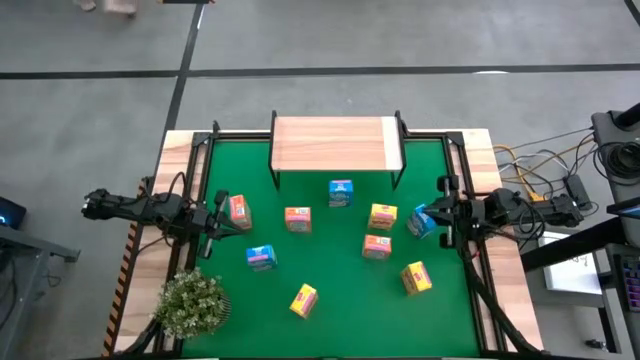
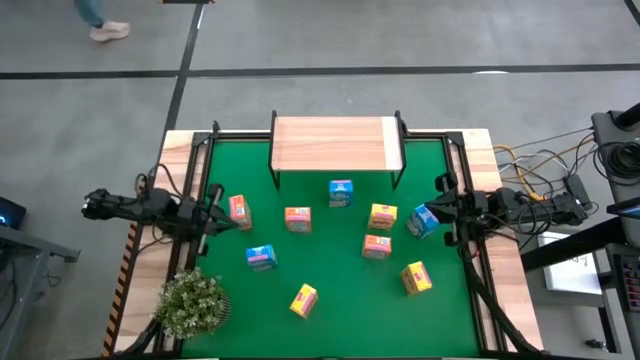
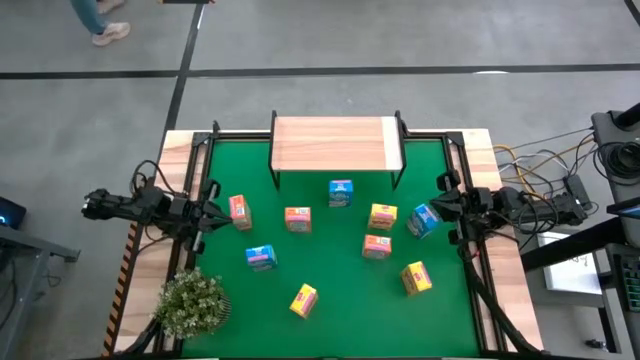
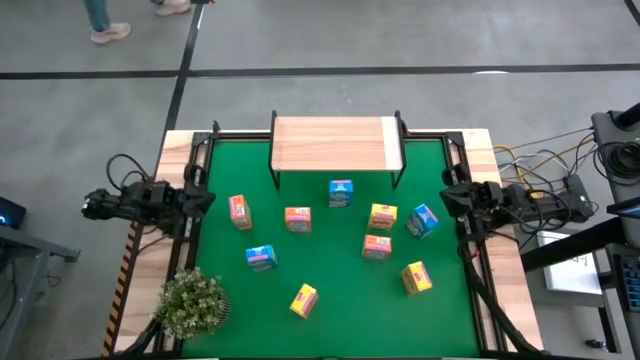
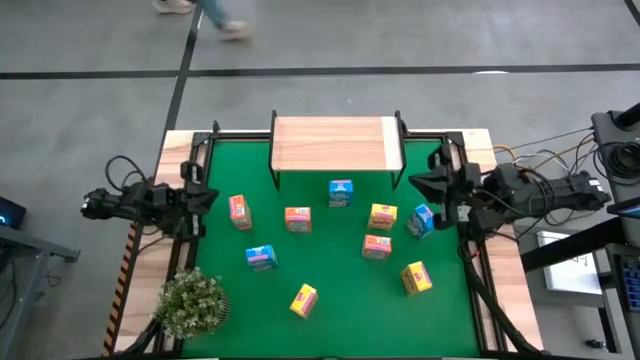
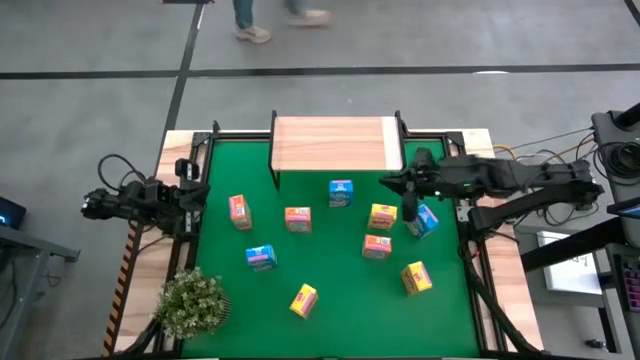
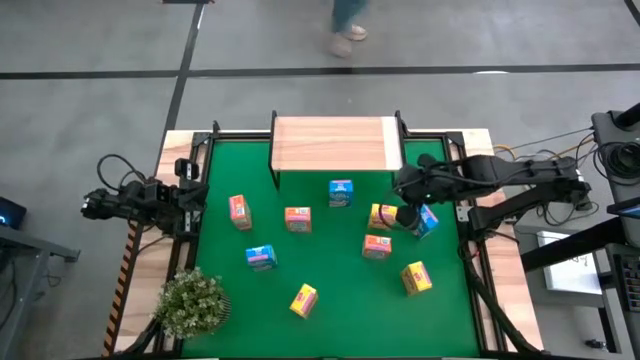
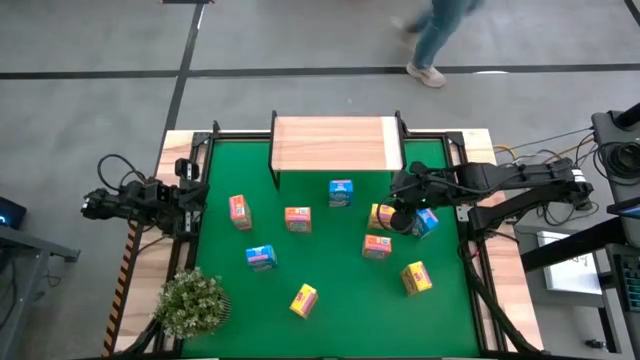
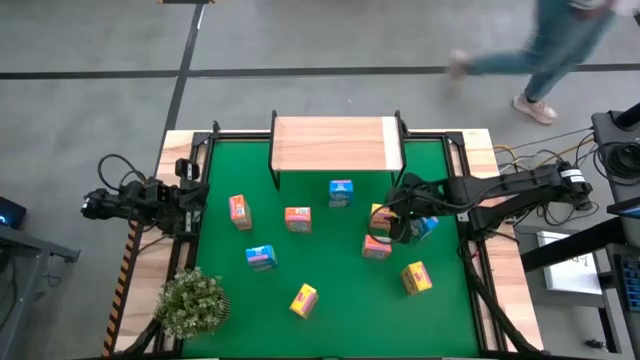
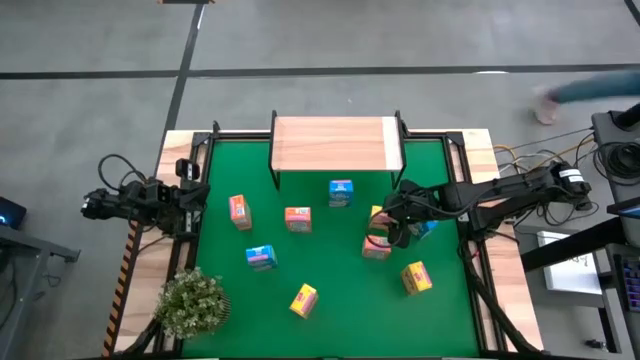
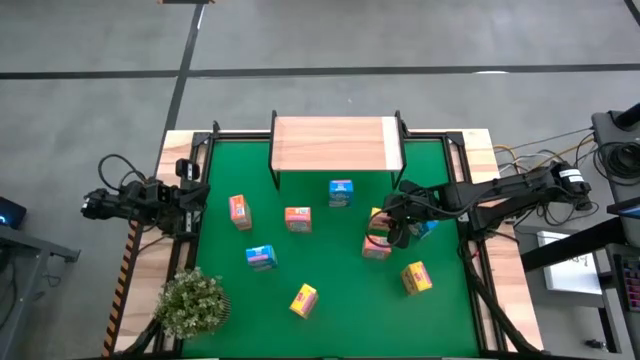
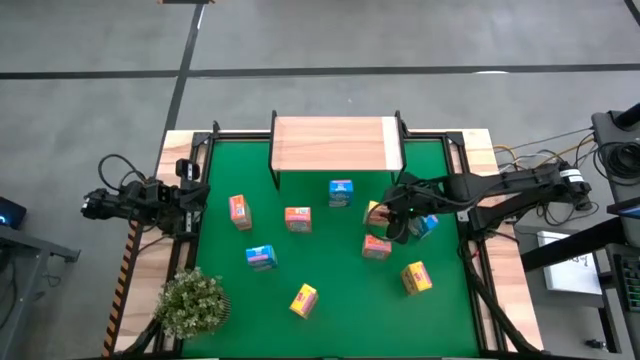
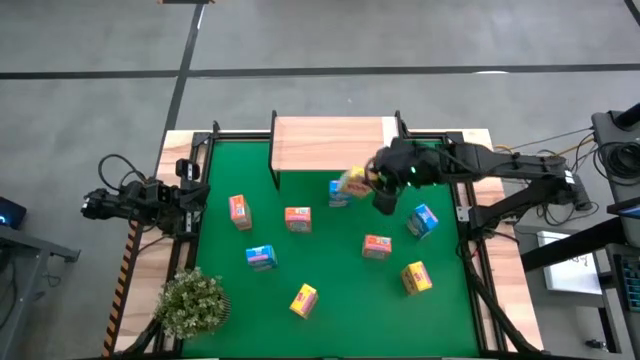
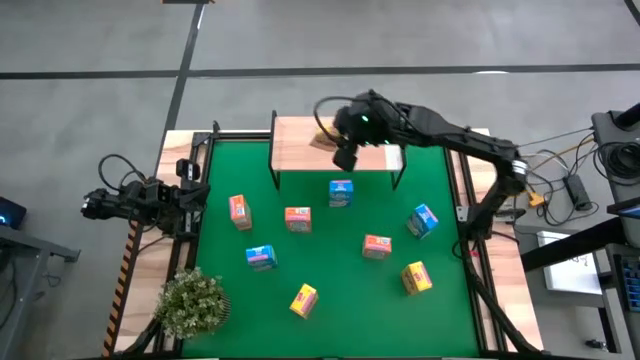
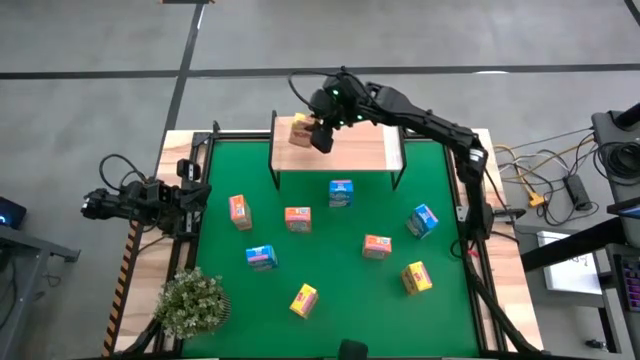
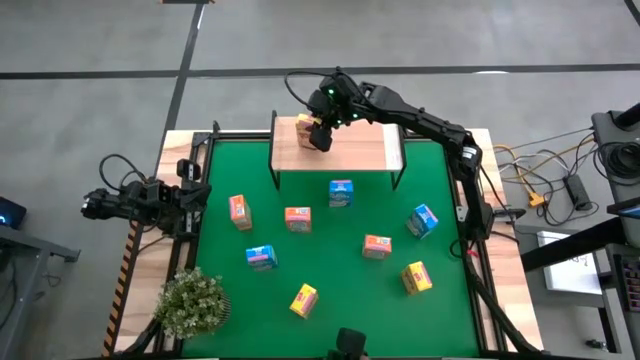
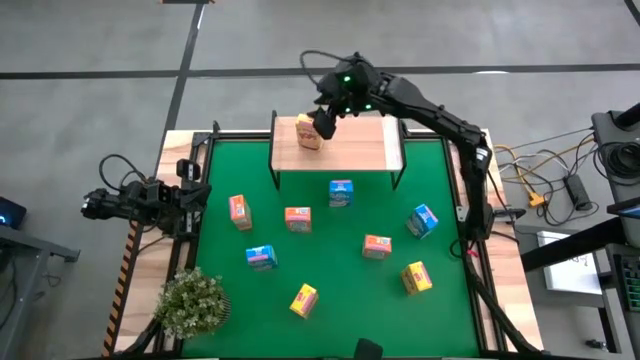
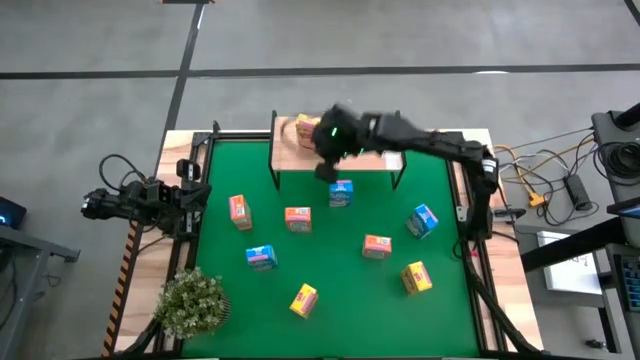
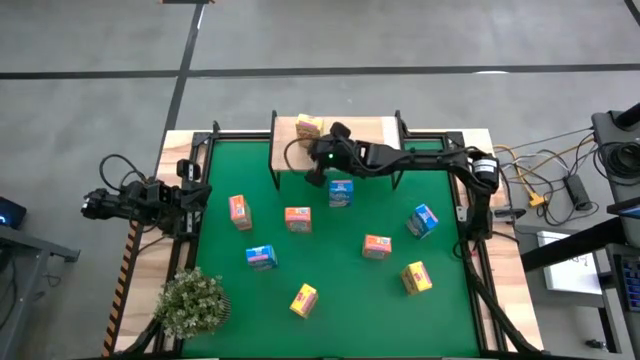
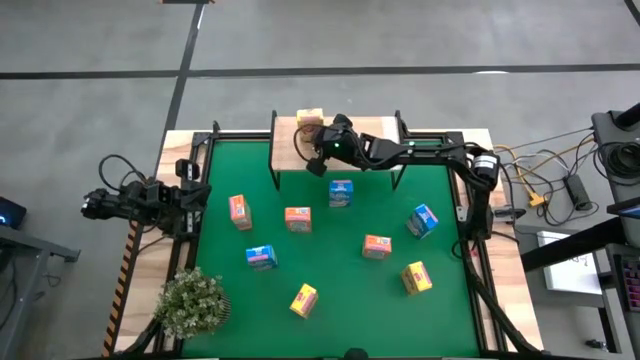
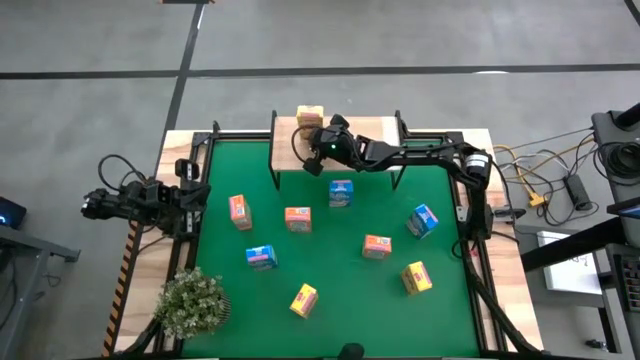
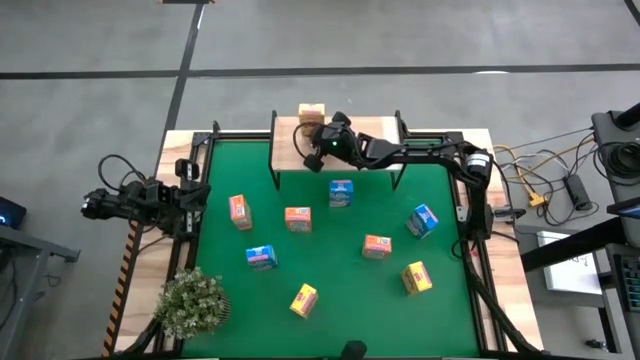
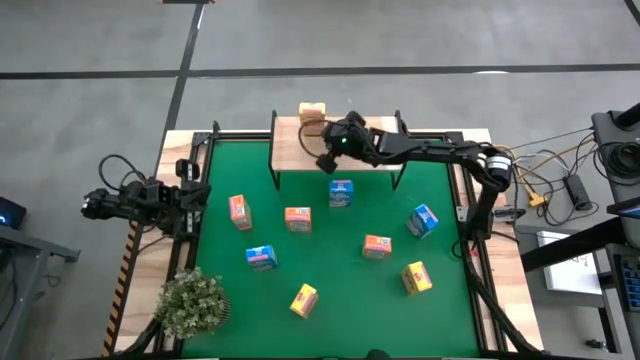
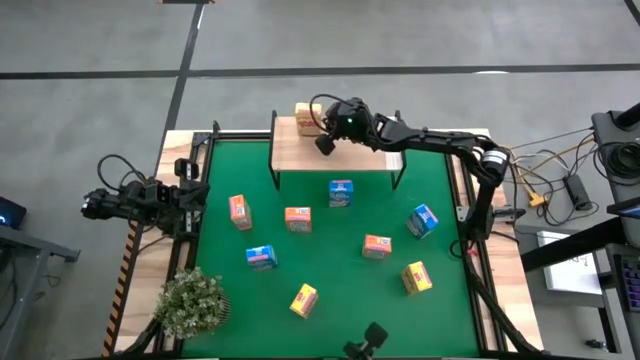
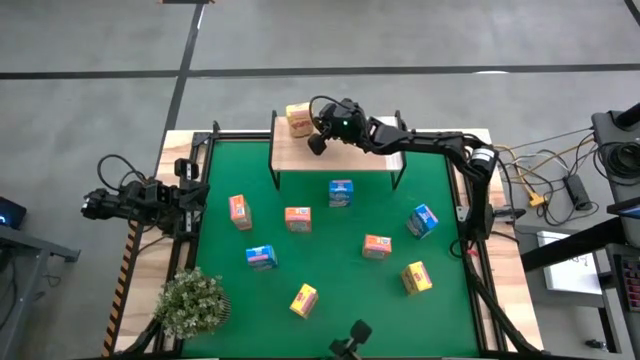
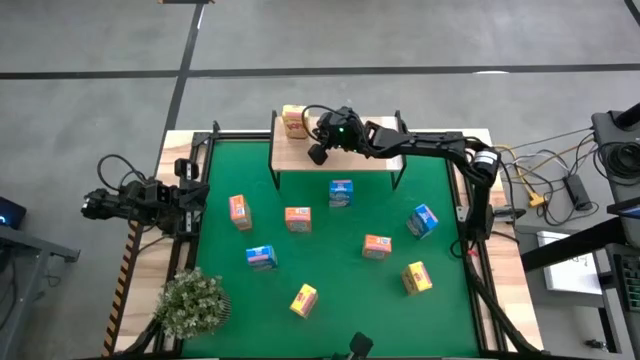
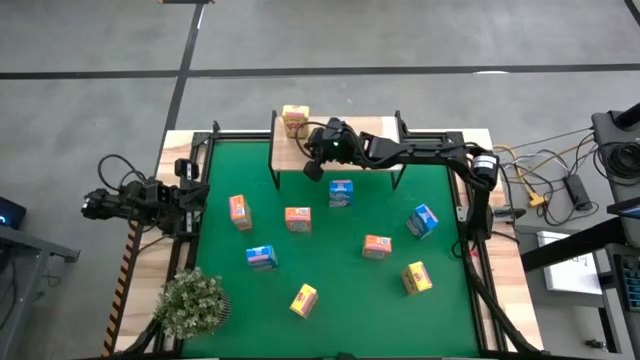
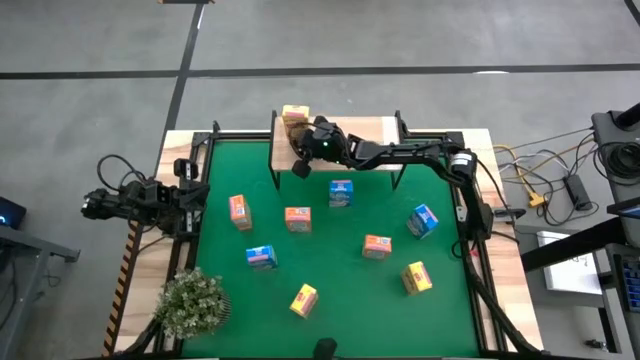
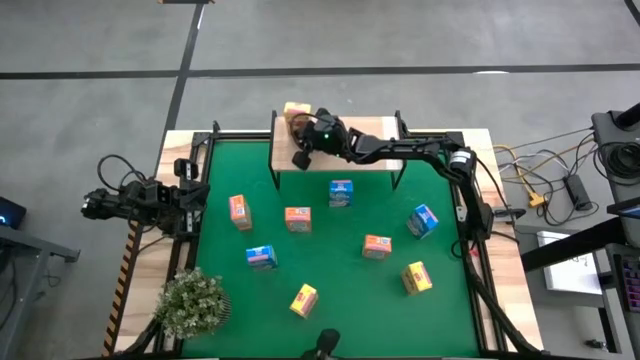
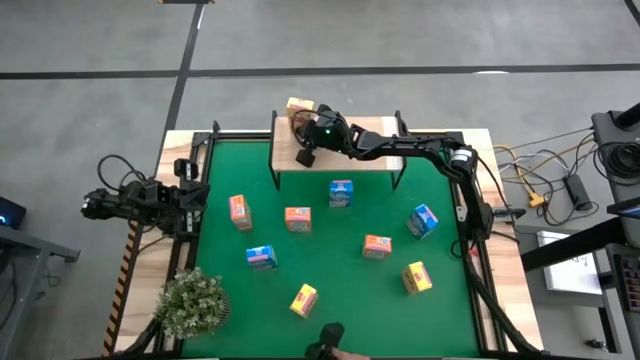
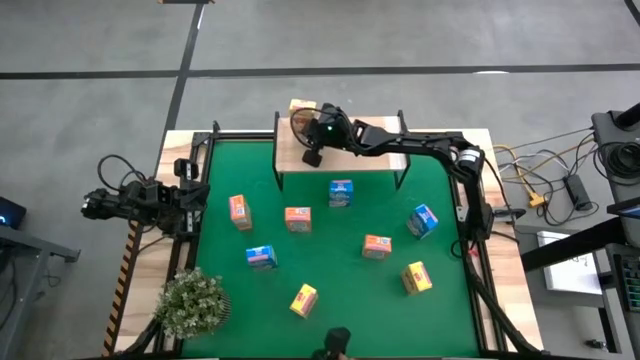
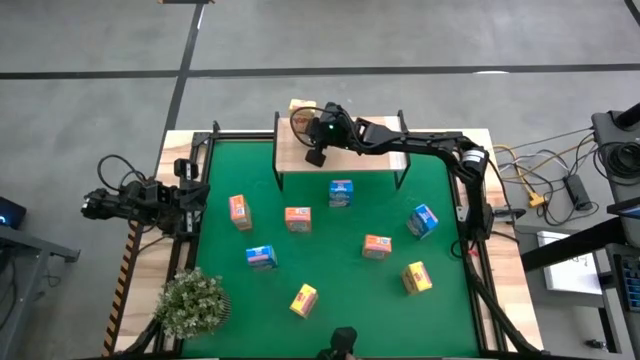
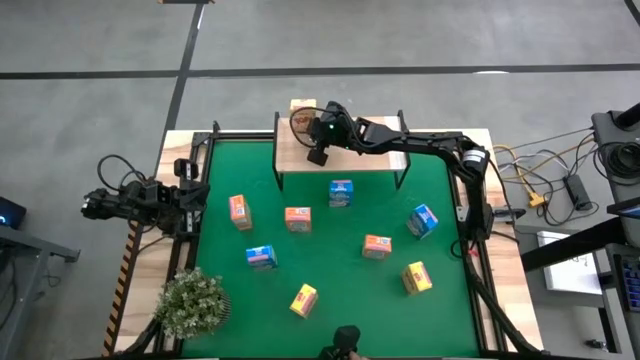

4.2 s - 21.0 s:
Task: Stack cereal on shelf
Put the top right yellow cereal box on the shelf

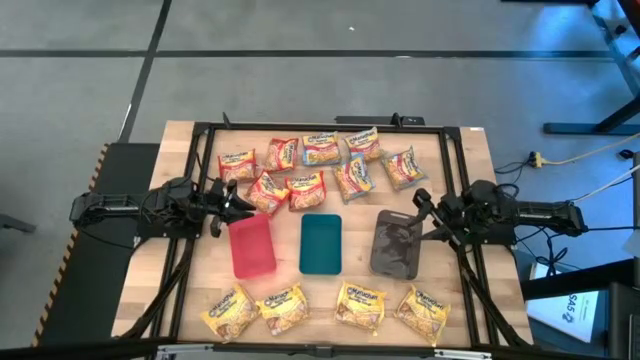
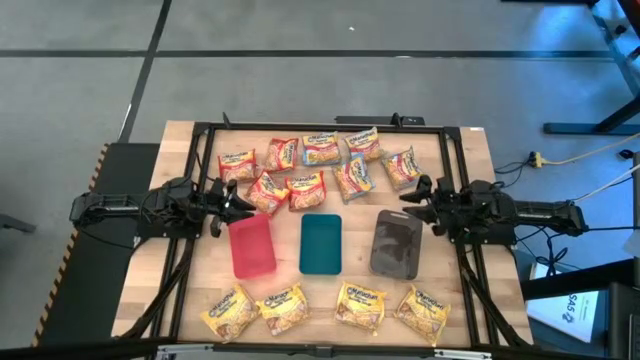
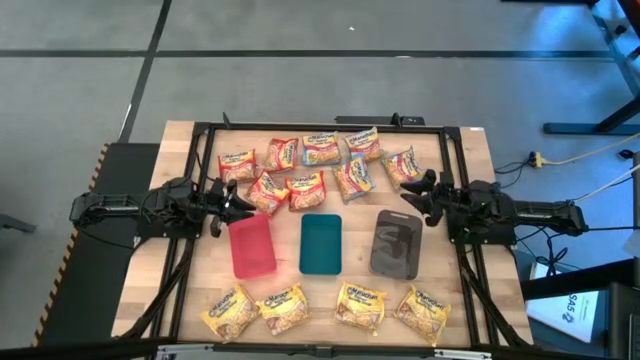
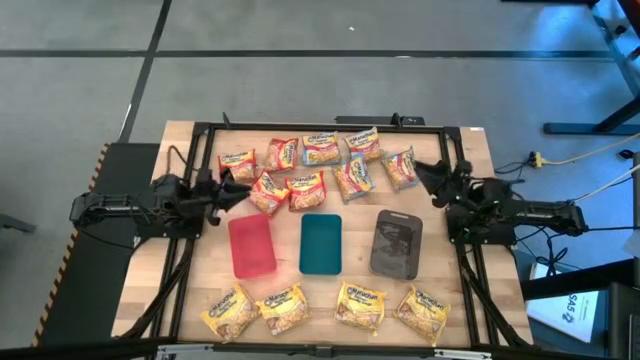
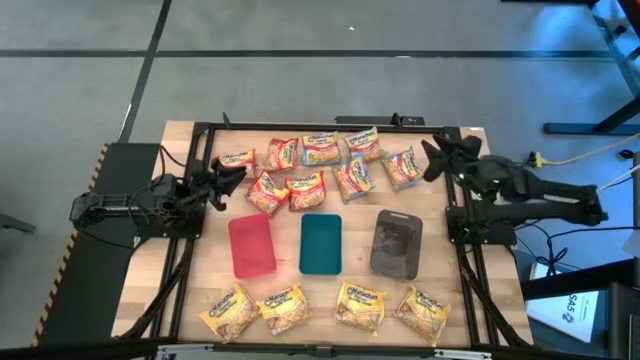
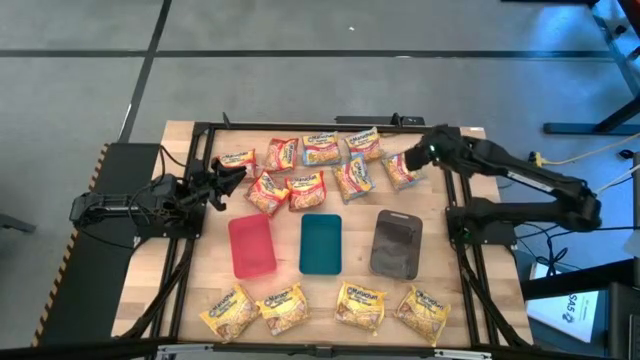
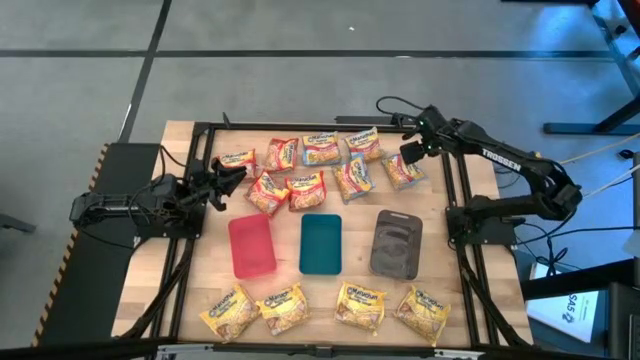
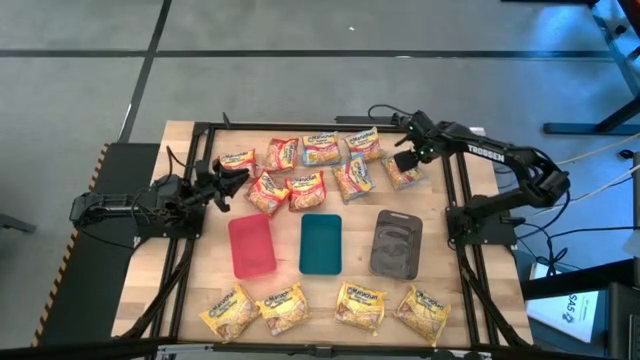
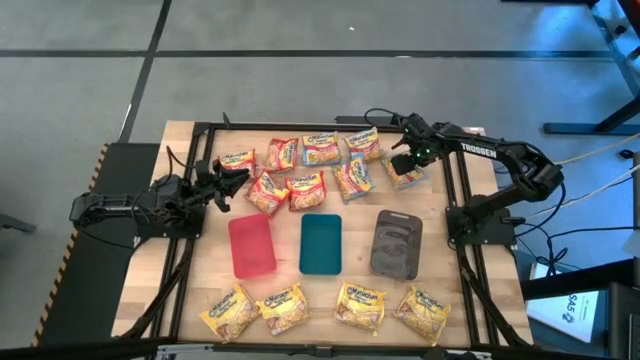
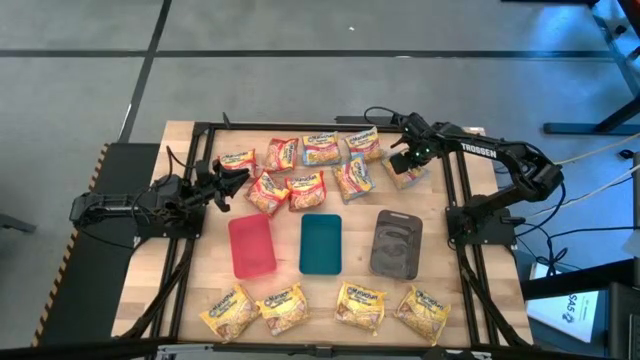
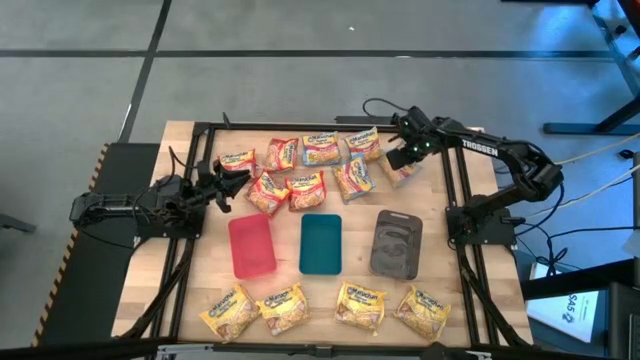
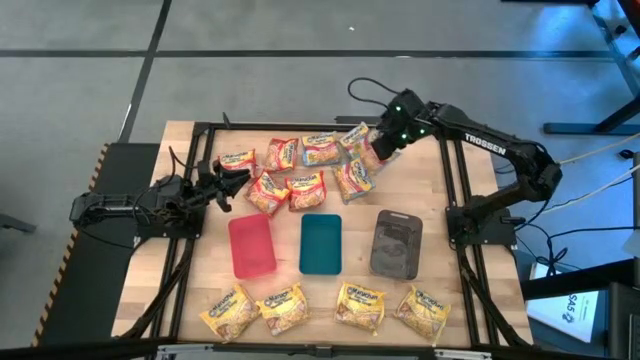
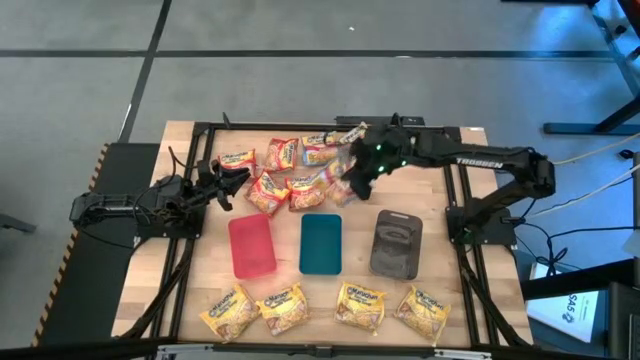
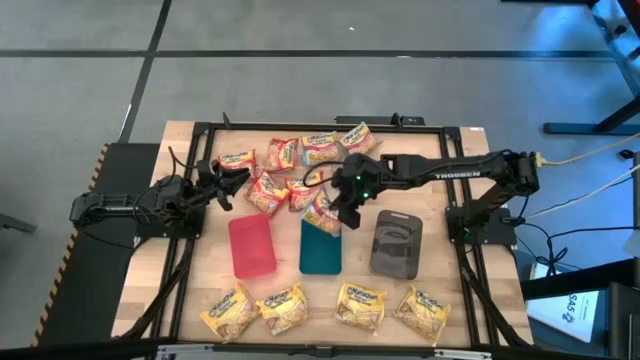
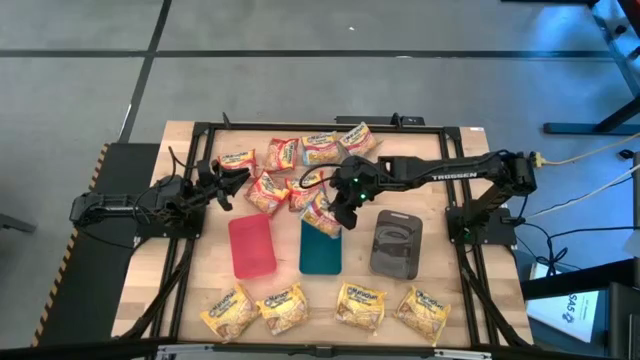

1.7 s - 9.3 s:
Task: Sort Maruchan noodles
Put the blue noodle pack into the blue bin
